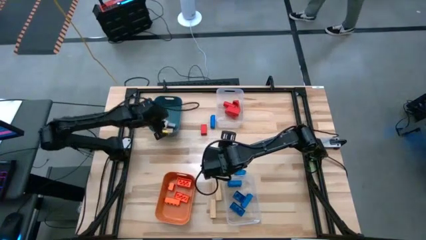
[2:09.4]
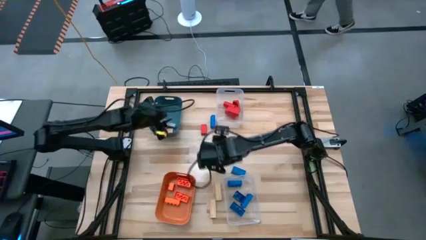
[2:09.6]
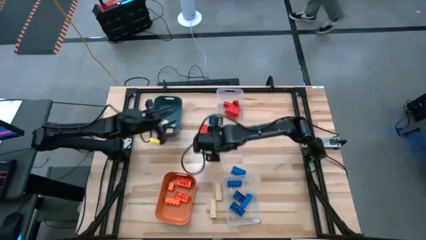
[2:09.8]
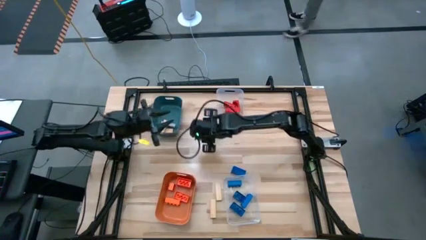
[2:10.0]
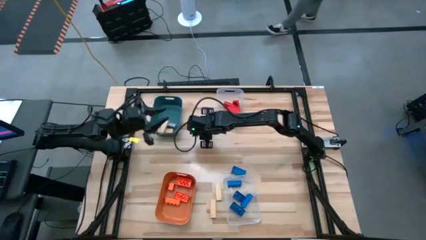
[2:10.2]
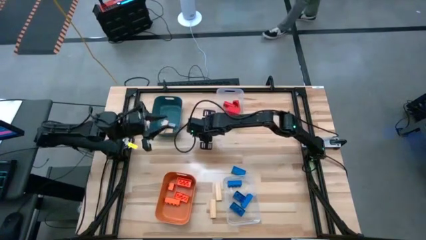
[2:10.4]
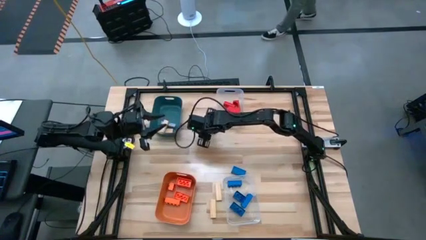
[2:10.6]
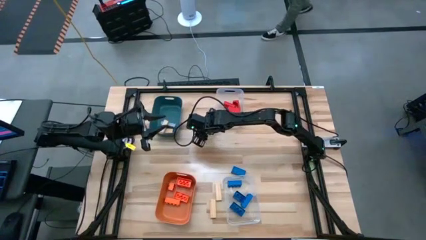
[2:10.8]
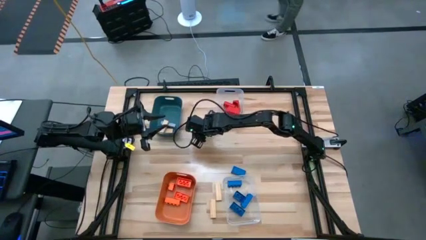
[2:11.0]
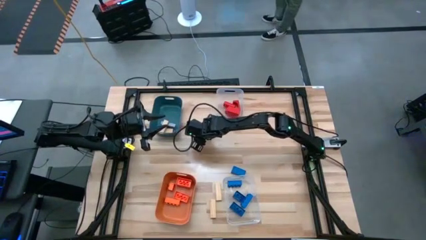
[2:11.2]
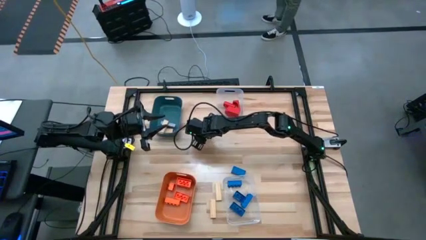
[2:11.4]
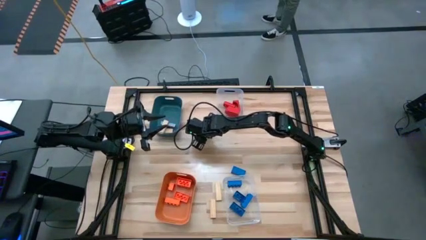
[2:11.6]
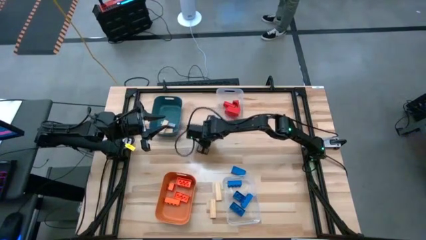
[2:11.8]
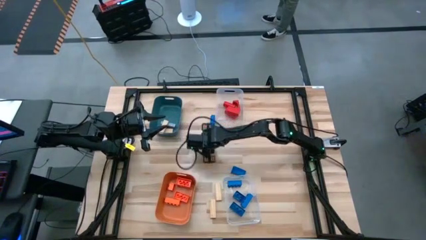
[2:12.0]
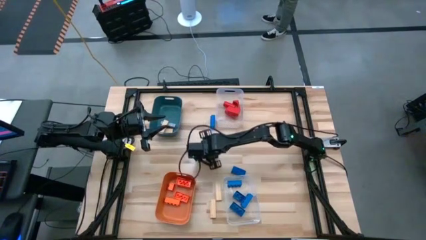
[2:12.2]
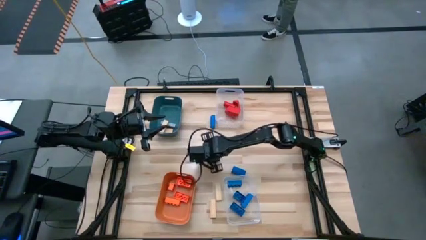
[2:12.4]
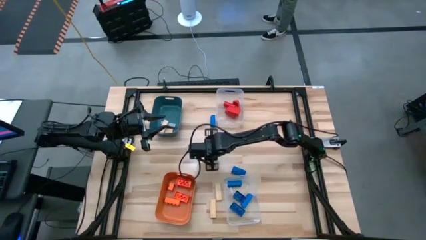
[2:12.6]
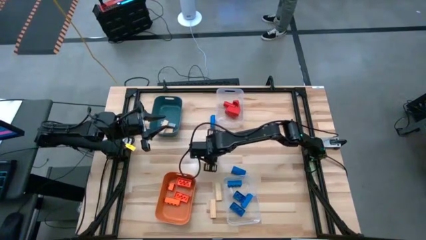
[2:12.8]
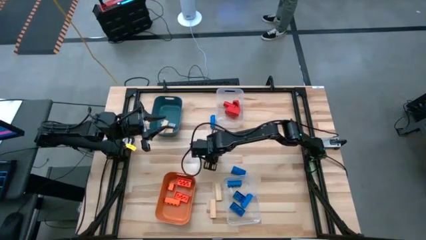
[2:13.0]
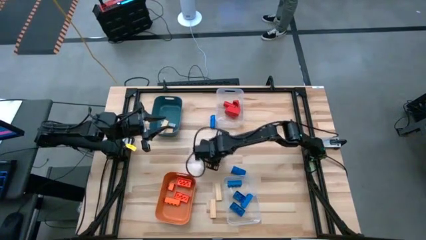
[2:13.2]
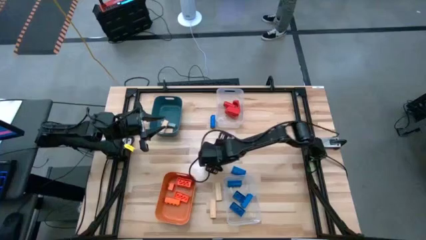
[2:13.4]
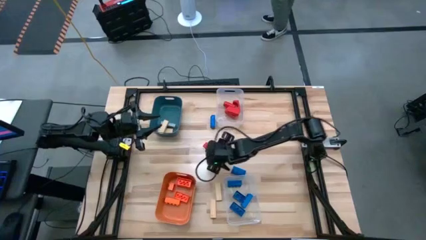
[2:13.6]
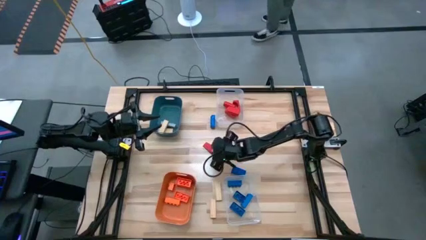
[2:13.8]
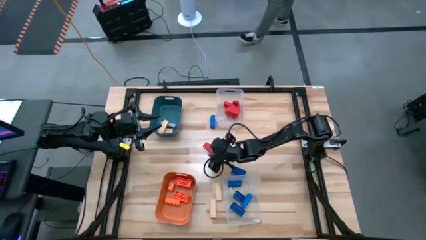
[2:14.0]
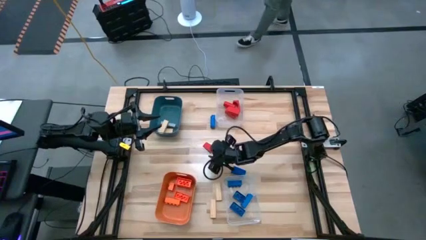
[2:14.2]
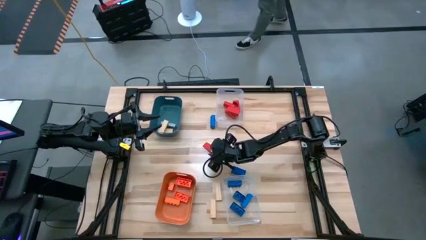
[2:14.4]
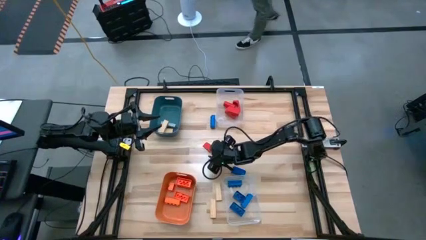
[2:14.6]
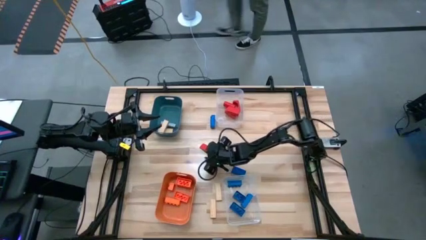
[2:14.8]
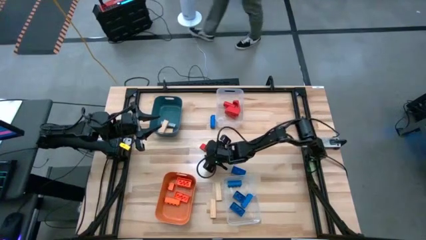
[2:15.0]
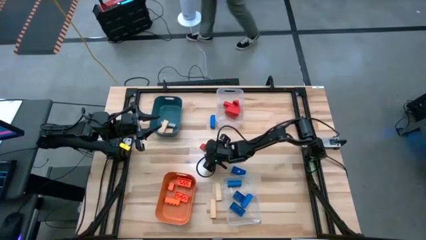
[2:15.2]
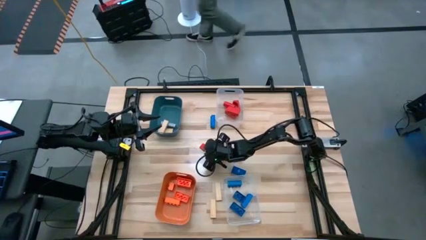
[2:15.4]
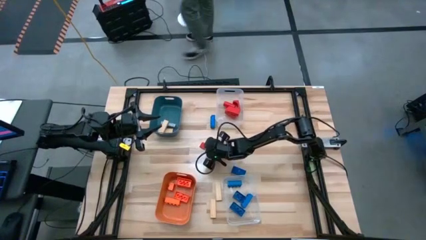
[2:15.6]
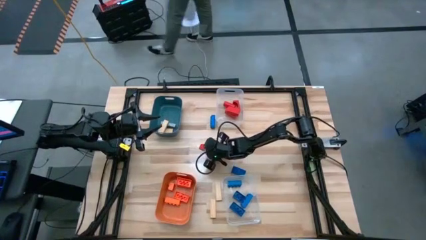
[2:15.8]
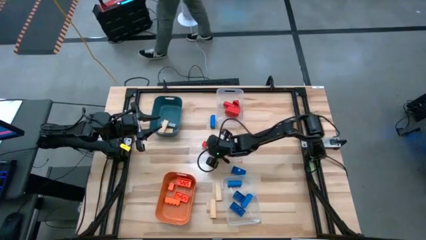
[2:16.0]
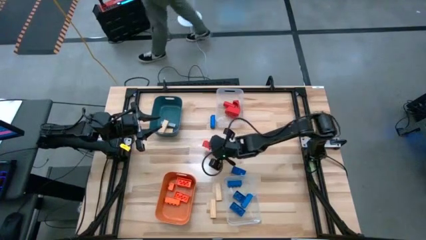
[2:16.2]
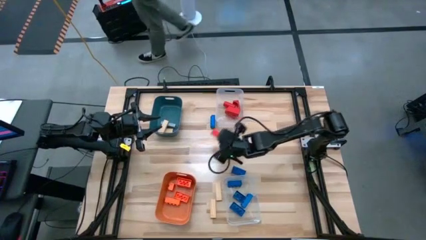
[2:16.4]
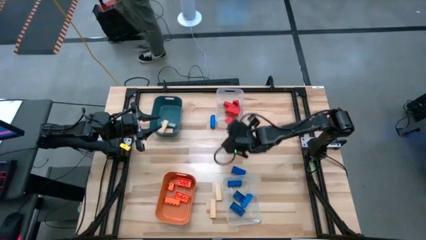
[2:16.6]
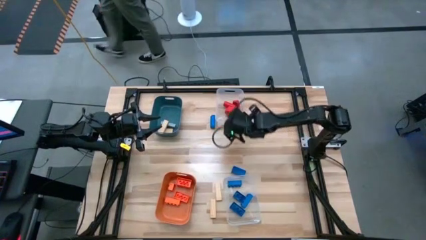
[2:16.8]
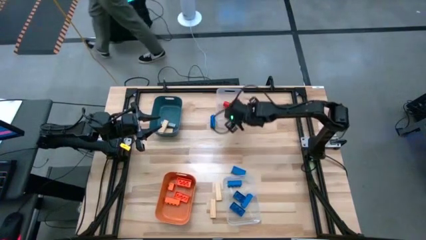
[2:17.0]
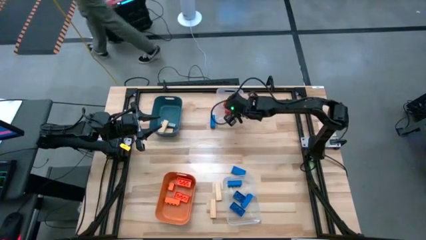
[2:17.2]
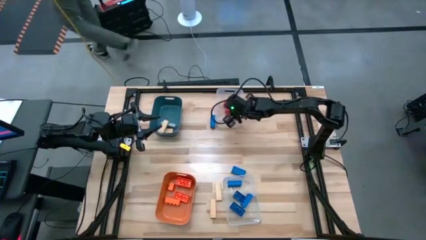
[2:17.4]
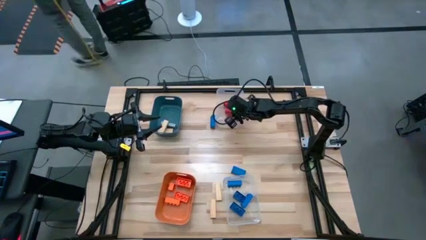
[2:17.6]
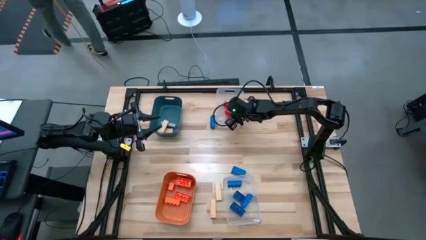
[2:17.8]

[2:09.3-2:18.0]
Task: Sort blocks
Put the red wooden block into the top transparent bin

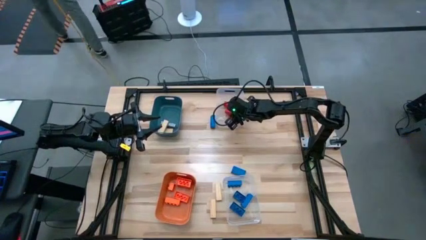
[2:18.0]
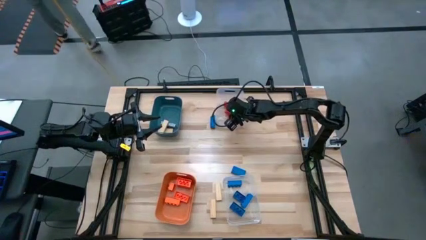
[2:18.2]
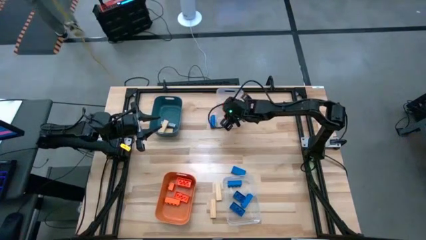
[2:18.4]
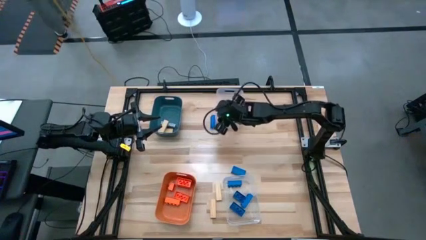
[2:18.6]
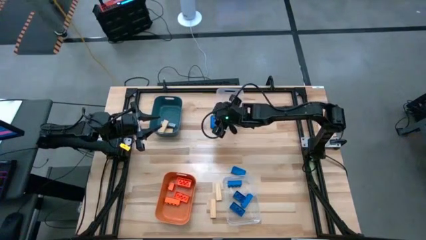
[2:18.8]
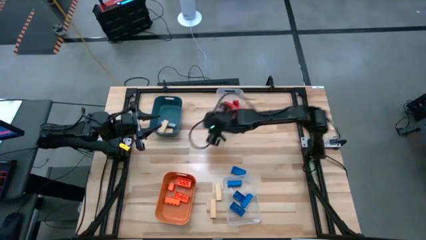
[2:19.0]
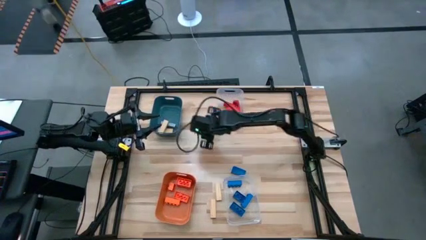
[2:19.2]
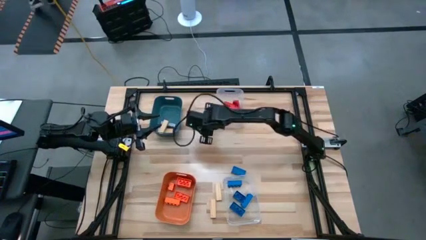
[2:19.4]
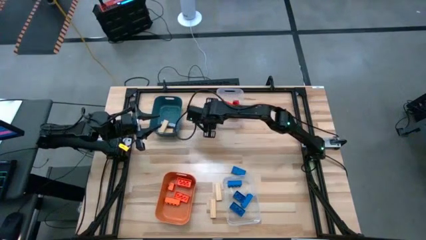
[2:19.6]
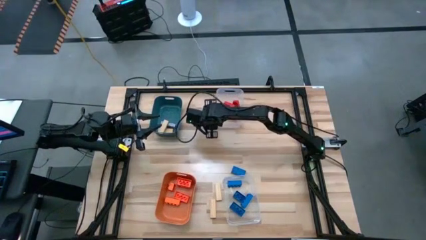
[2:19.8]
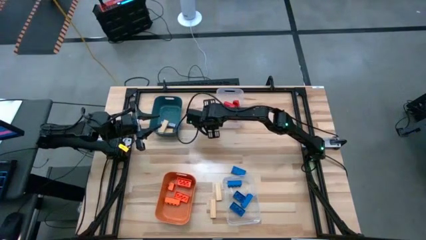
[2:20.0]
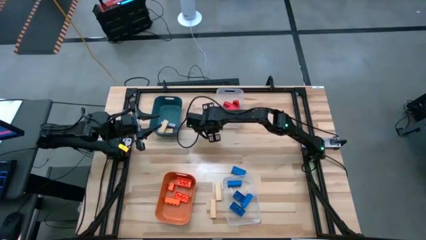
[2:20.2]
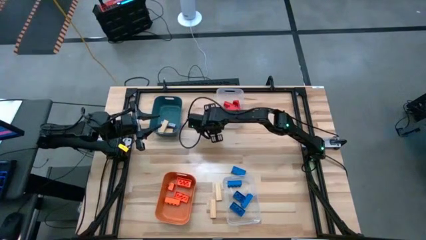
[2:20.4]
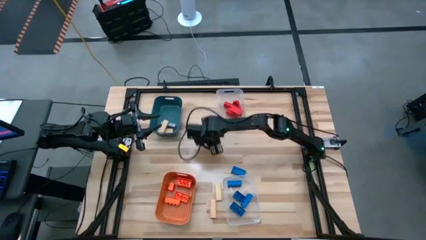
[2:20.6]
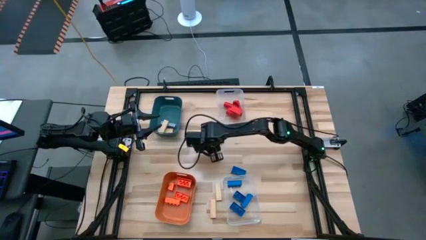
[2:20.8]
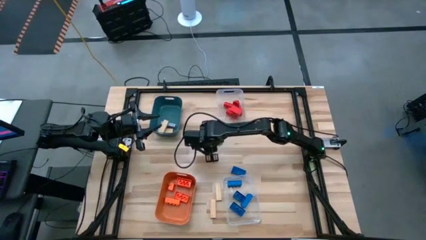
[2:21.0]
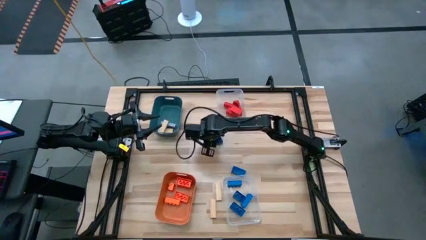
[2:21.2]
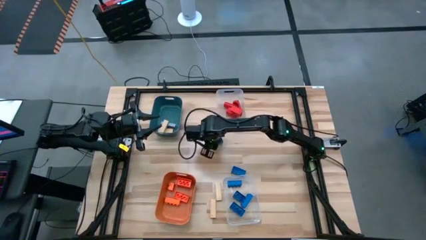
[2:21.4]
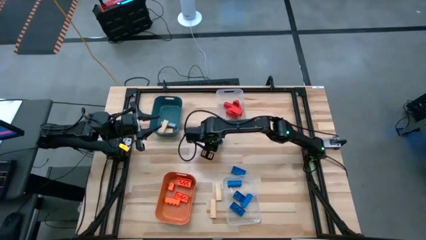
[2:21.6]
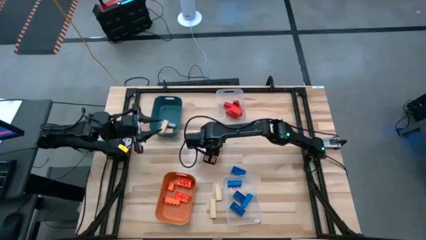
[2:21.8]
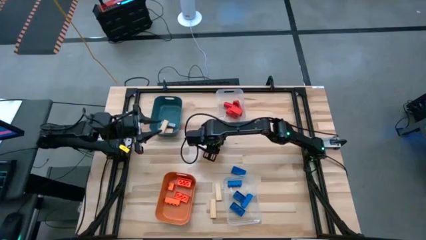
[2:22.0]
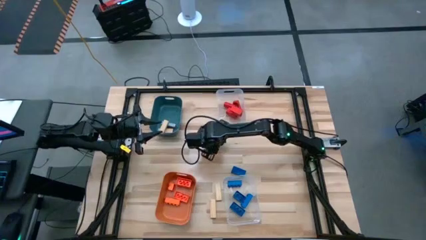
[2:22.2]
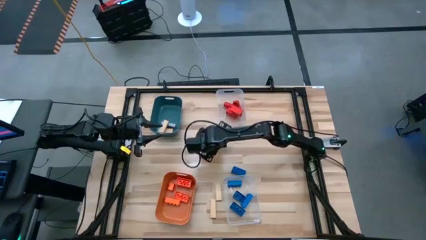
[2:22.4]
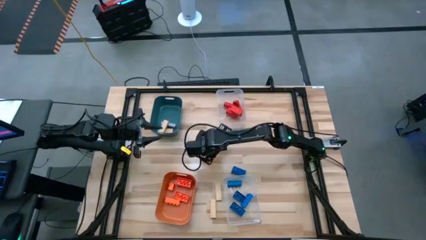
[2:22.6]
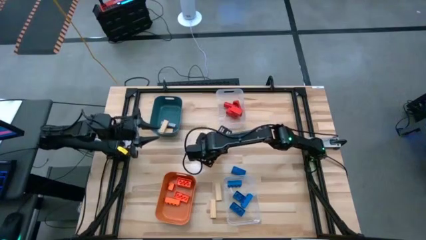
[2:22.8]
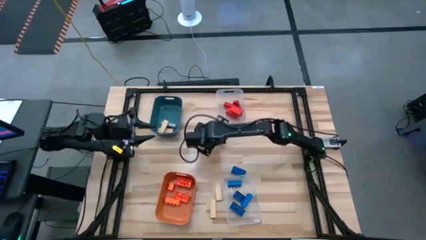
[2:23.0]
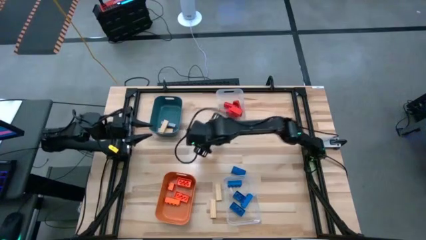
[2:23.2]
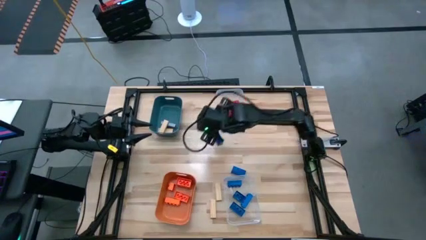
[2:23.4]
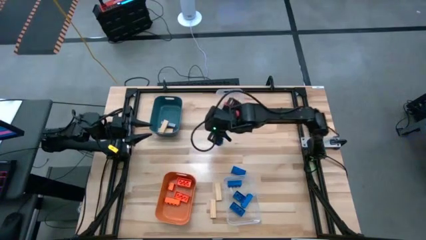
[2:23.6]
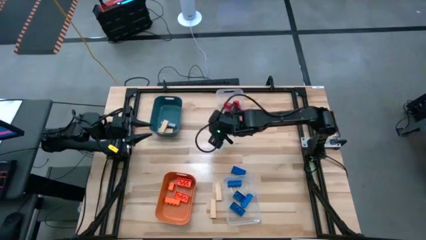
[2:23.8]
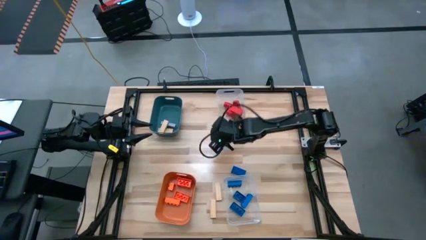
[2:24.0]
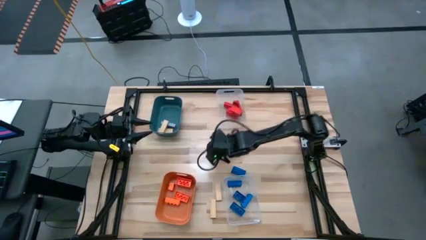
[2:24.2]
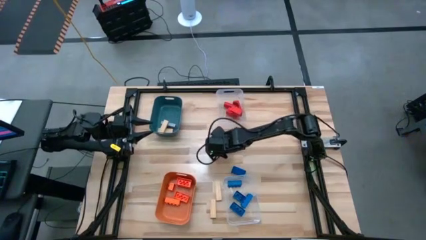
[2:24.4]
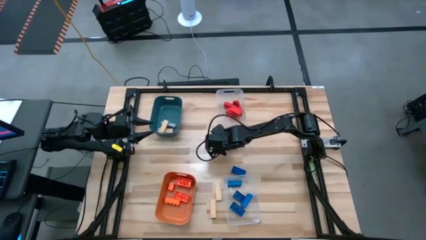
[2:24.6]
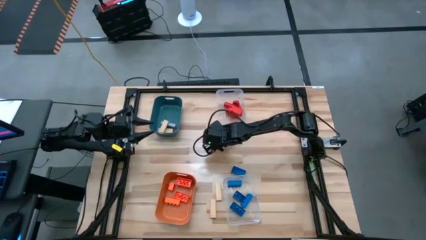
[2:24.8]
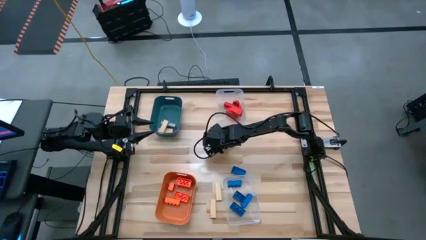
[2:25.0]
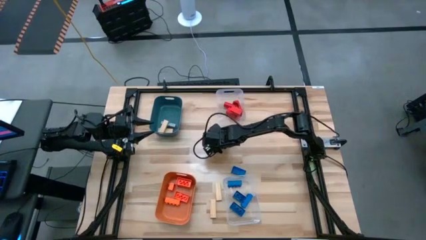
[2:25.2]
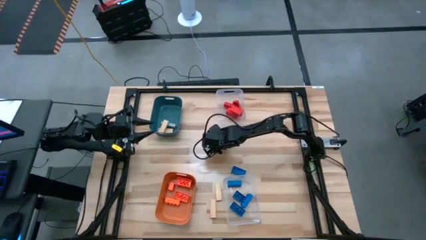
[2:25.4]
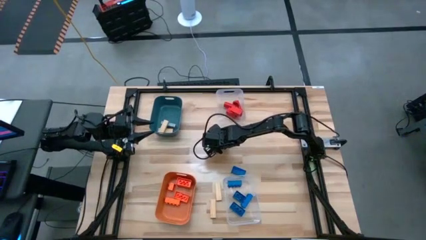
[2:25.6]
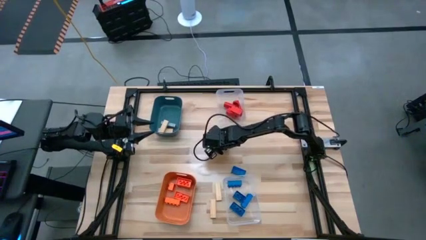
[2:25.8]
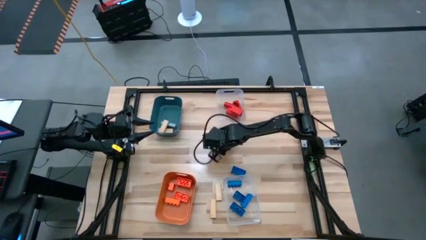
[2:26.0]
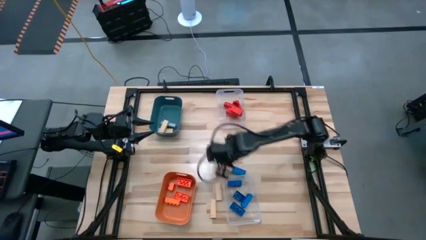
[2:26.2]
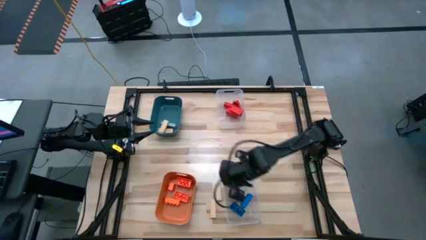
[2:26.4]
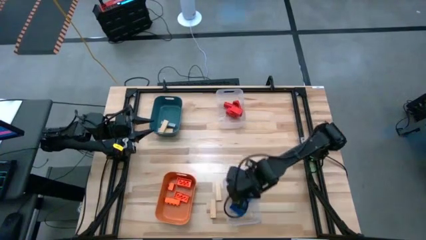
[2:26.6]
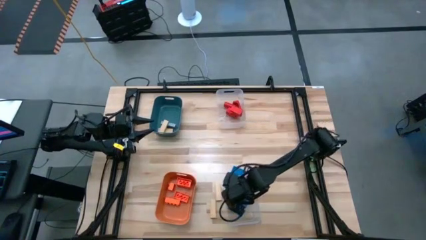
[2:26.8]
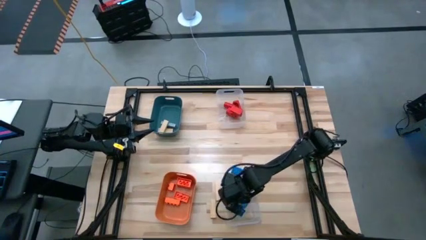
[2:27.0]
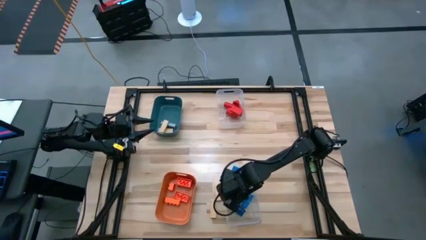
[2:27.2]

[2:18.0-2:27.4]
Put the blue game piece into the bottom transparent bin
